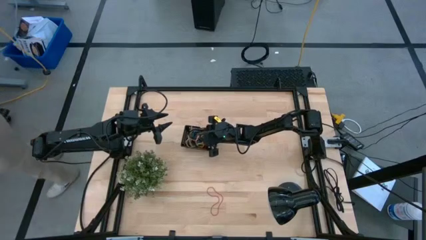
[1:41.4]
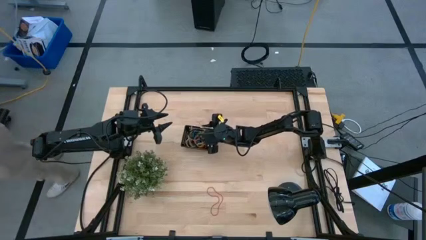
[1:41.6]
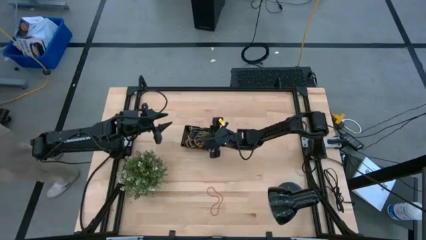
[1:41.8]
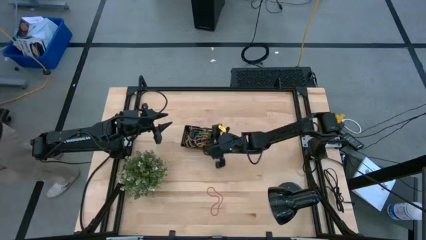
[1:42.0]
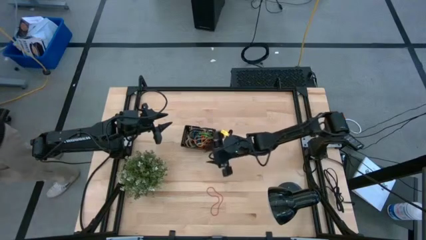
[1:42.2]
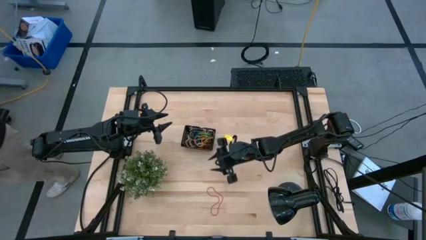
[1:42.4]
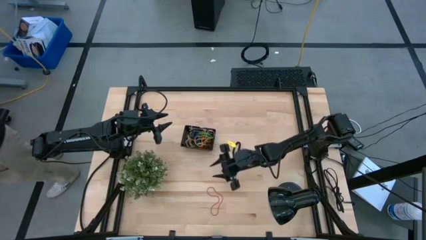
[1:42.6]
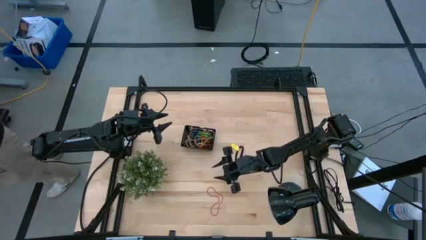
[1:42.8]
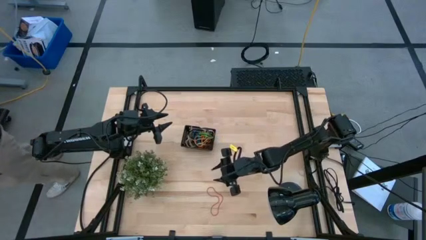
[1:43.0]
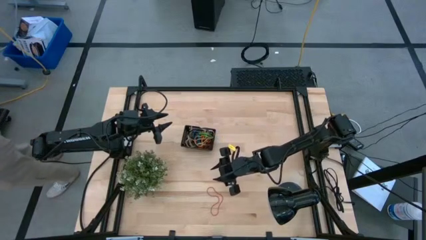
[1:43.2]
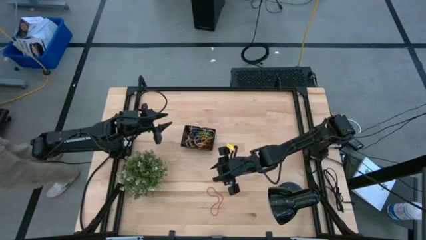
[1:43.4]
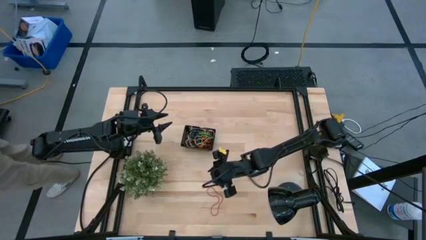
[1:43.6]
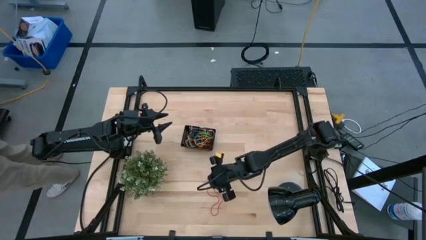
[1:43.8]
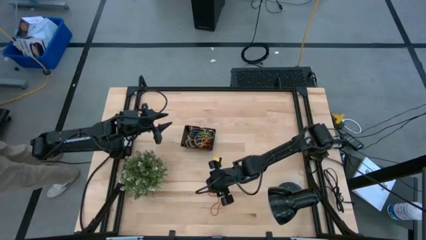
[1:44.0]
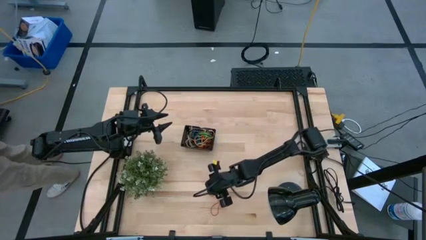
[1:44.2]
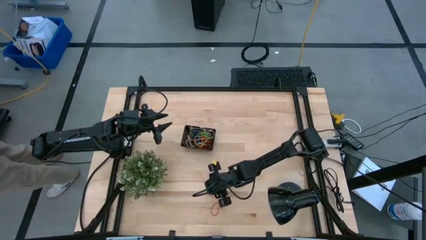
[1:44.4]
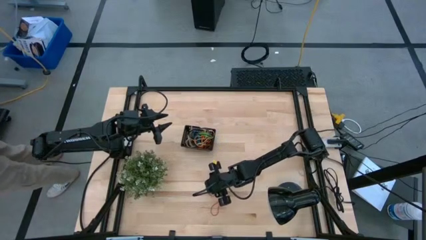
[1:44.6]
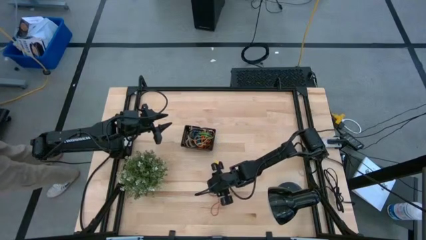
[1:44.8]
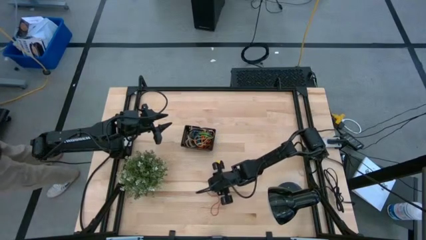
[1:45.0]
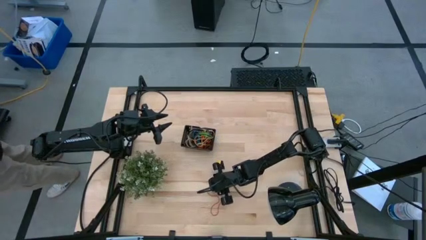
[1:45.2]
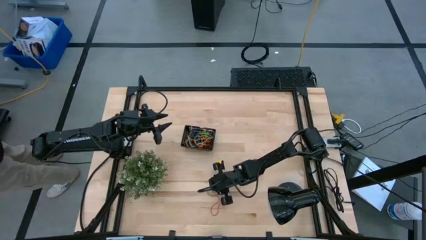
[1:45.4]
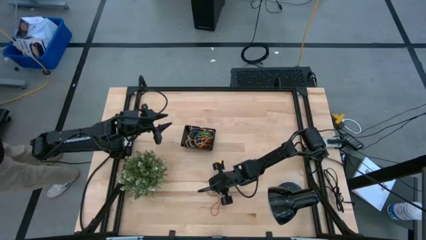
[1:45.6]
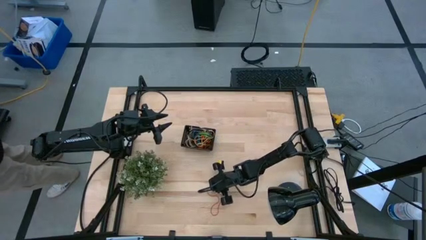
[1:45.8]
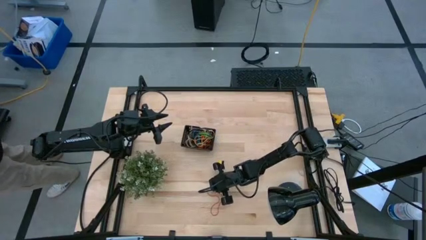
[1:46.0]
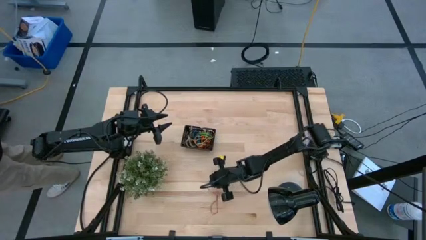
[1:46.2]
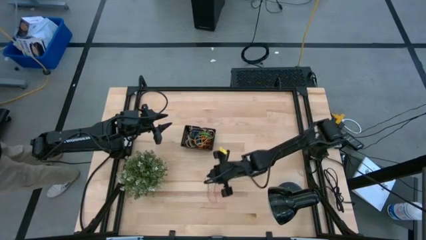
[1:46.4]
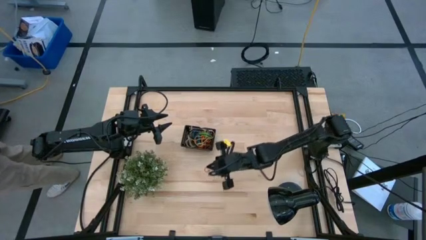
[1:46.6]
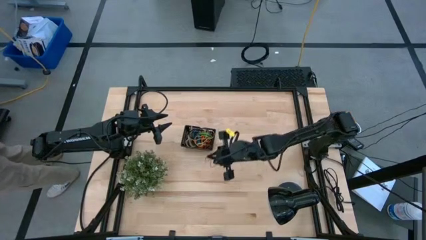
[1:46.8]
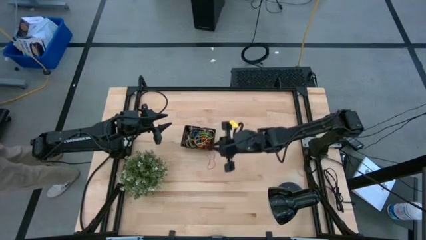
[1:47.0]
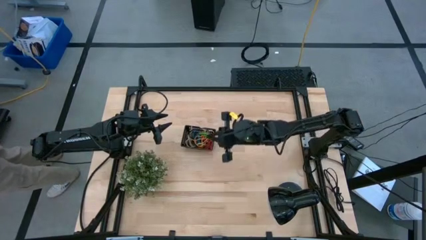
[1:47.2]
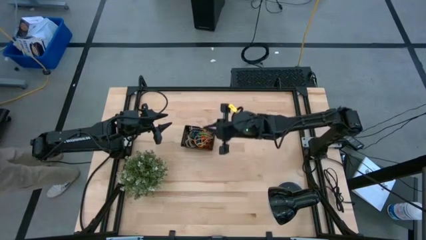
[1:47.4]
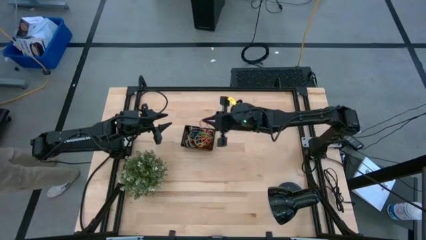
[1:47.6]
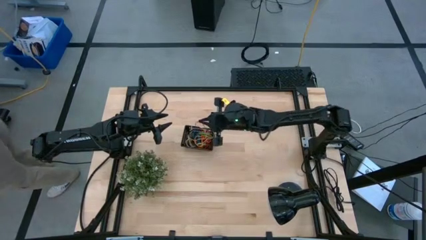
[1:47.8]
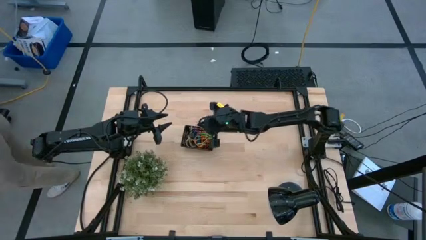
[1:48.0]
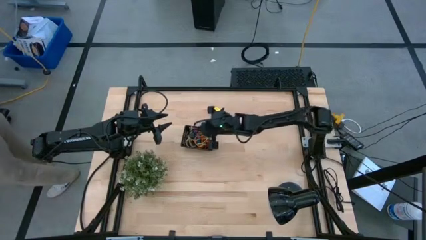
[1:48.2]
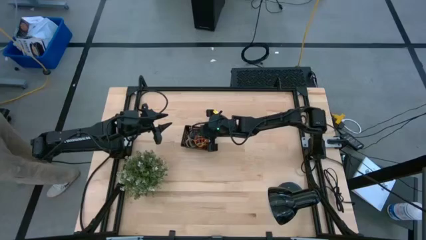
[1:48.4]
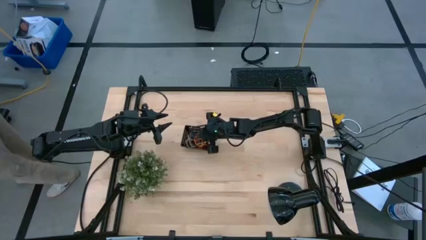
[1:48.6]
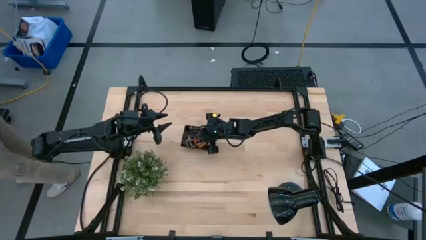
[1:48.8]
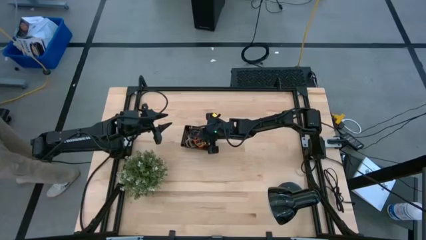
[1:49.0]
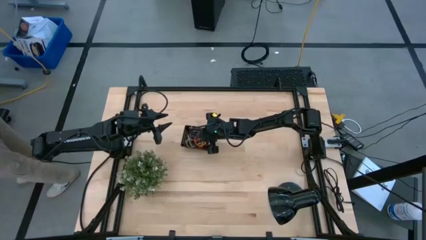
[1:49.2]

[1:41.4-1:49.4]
Task: Pick and place rubber bands into bin
Put the red rubber band into the black bin

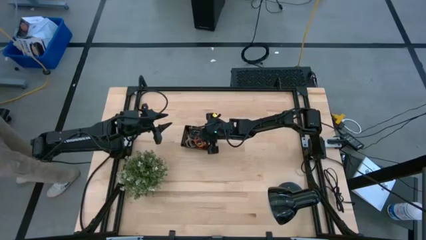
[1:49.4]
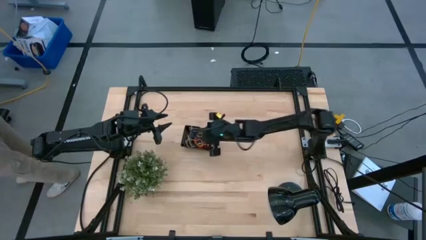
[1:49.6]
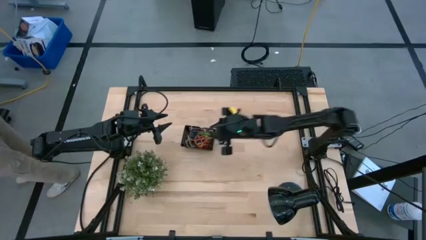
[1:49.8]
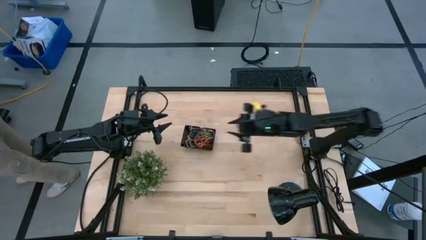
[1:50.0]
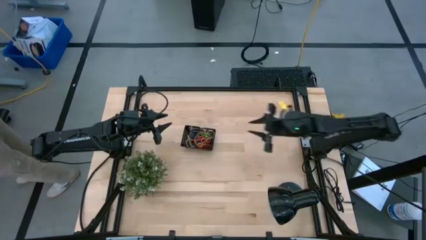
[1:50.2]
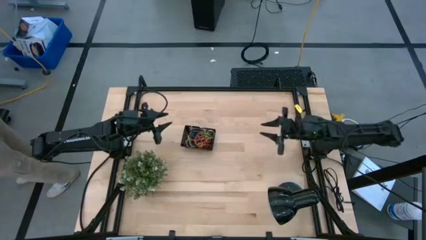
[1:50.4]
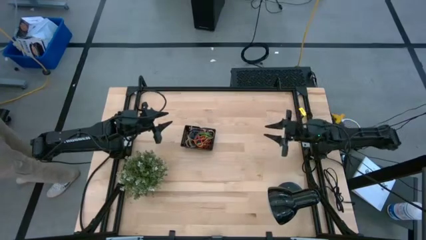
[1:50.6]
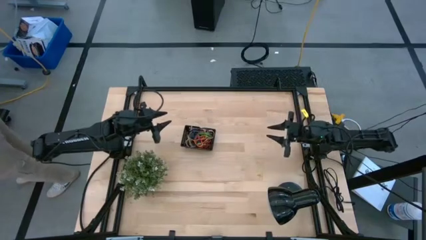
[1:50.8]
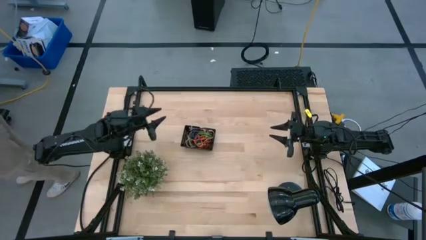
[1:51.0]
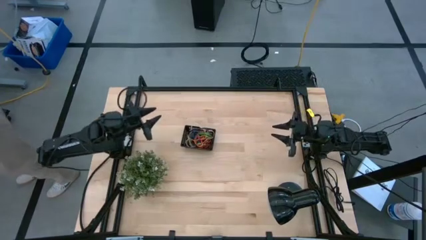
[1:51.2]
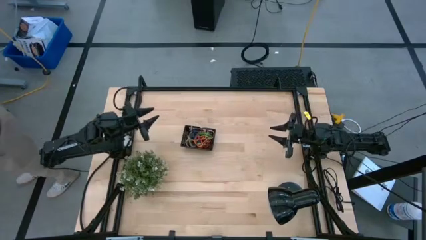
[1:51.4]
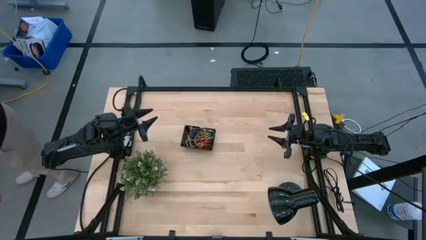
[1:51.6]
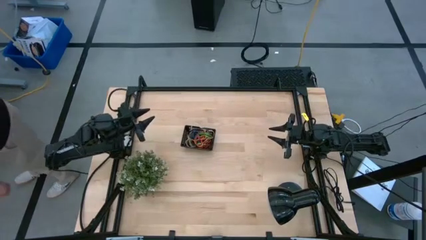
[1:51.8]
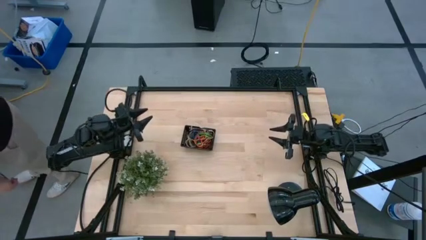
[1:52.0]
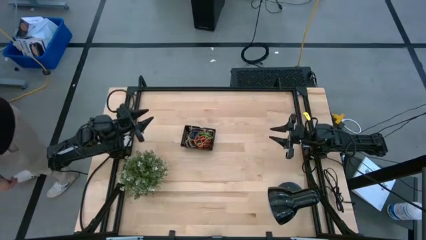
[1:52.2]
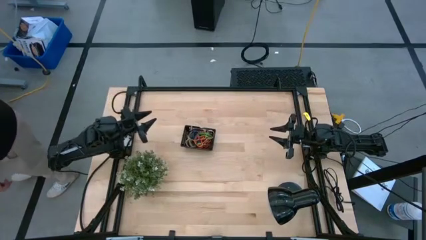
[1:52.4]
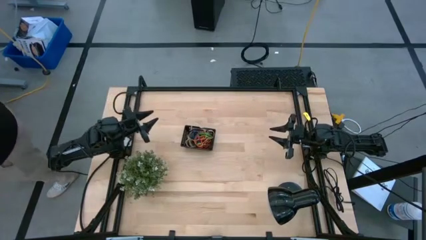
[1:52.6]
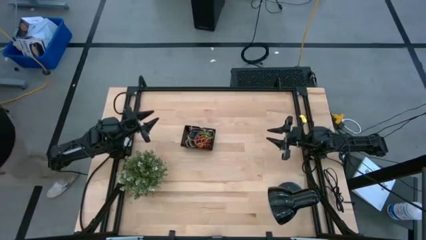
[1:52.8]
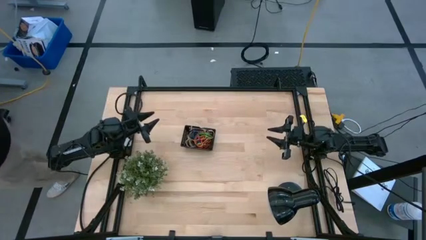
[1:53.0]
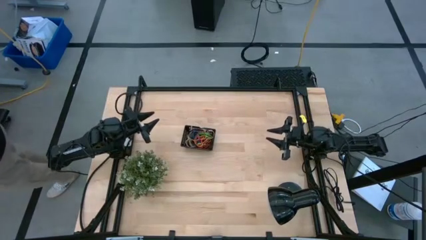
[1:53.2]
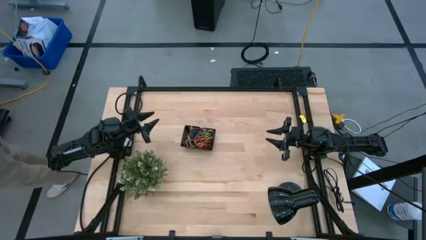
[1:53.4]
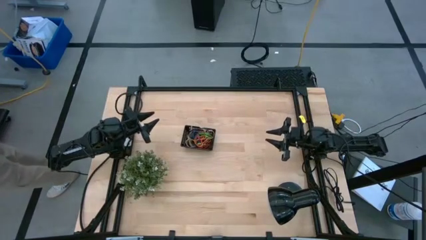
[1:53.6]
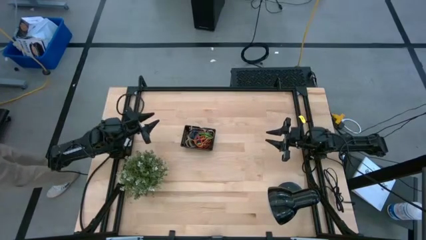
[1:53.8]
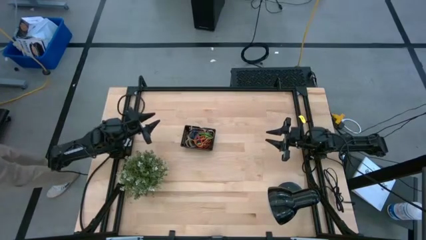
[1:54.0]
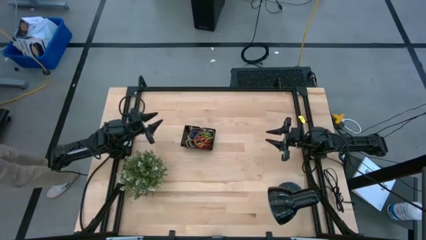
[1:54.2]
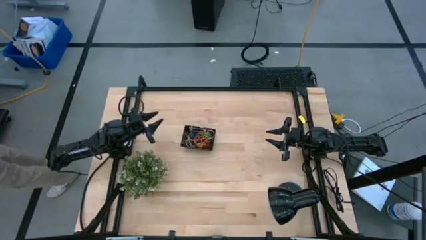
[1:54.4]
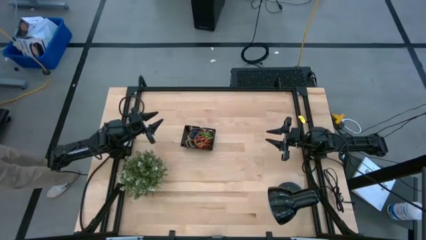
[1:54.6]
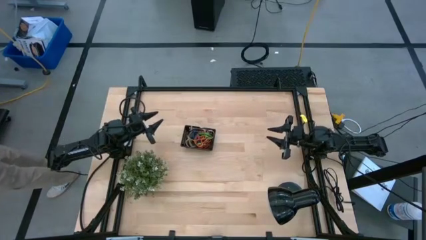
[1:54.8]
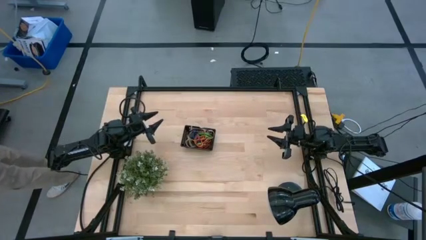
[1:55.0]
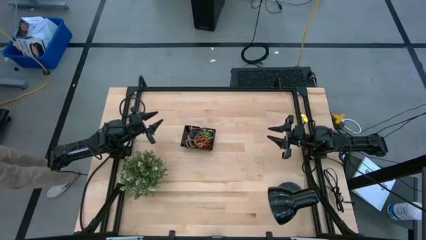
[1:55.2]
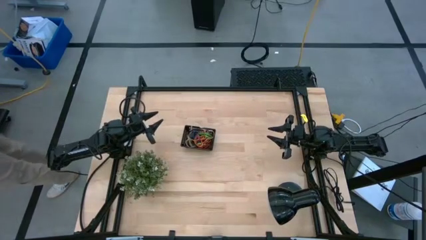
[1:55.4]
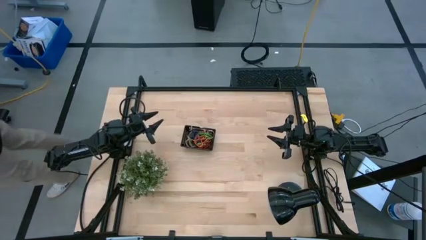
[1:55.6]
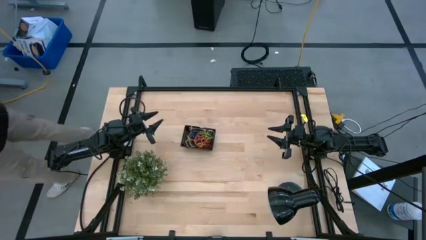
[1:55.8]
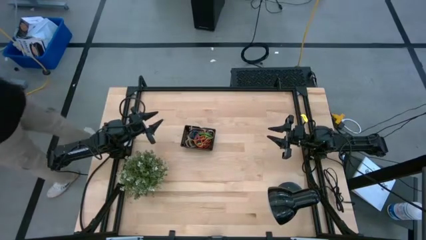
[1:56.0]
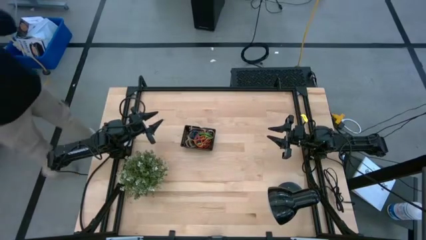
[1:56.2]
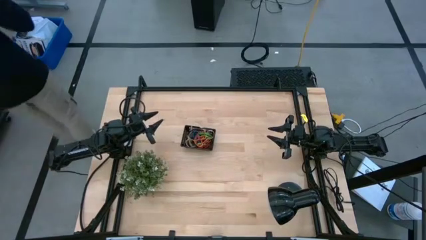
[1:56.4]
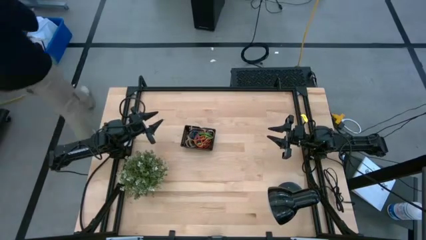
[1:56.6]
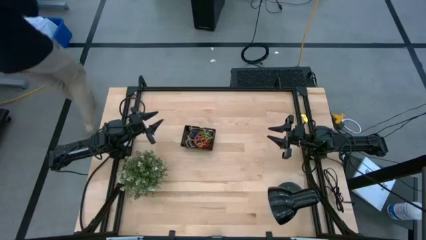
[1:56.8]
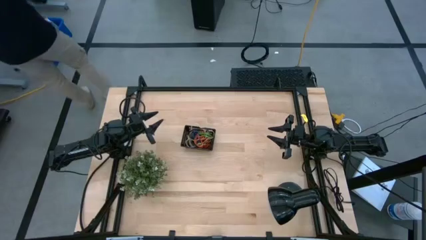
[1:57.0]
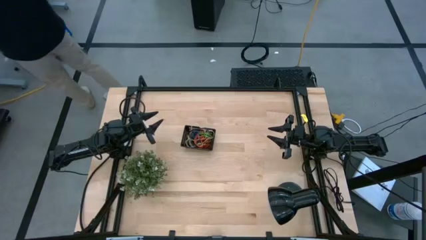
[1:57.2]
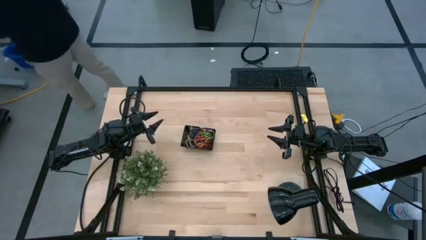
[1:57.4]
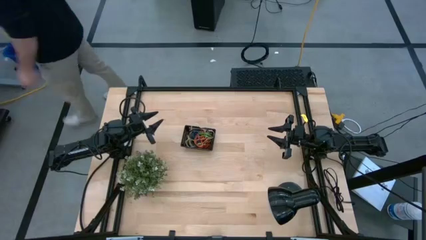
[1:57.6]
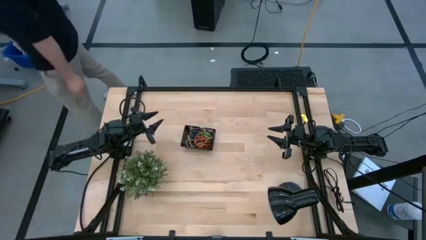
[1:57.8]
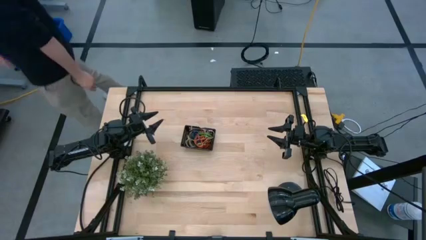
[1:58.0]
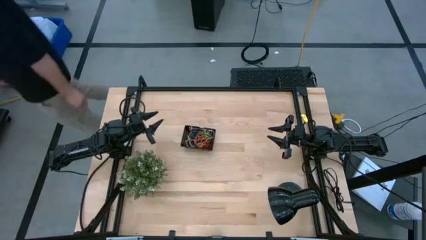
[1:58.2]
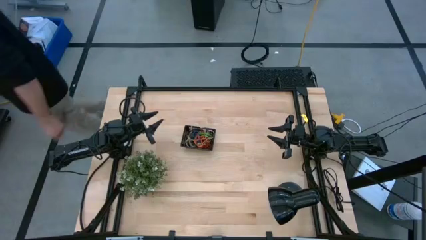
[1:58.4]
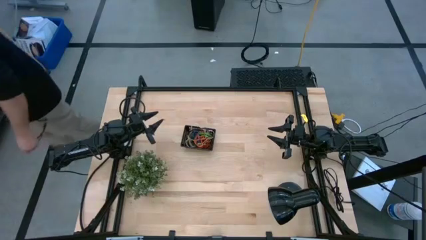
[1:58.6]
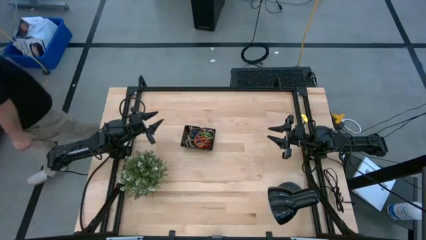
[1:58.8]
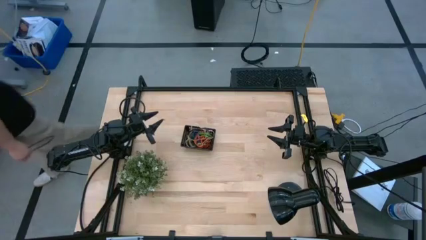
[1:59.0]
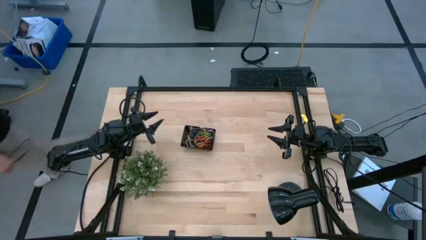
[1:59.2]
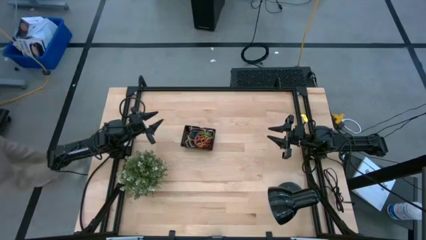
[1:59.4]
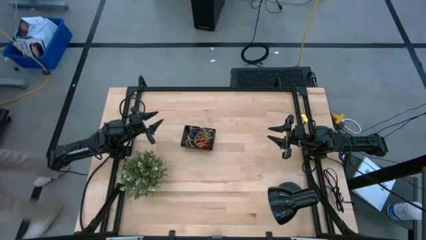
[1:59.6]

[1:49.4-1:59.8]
Return to Home Position
